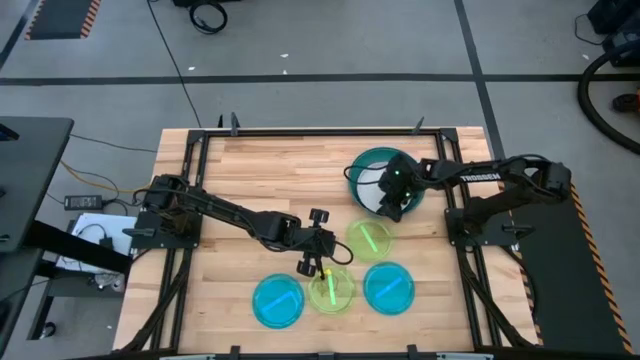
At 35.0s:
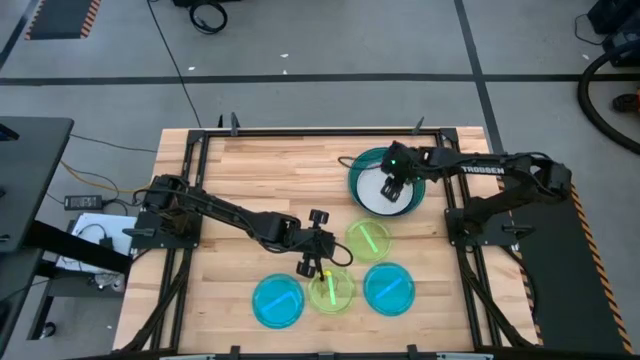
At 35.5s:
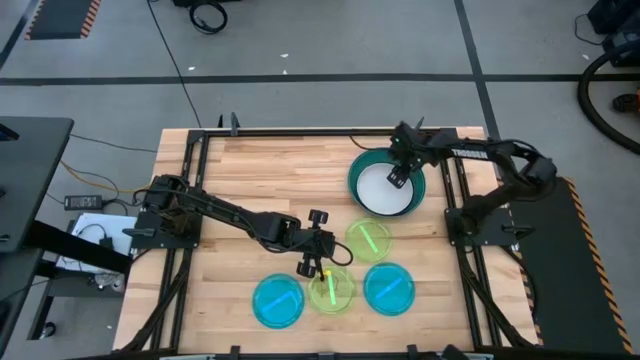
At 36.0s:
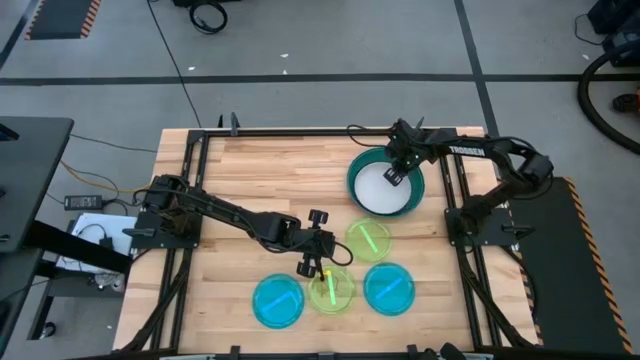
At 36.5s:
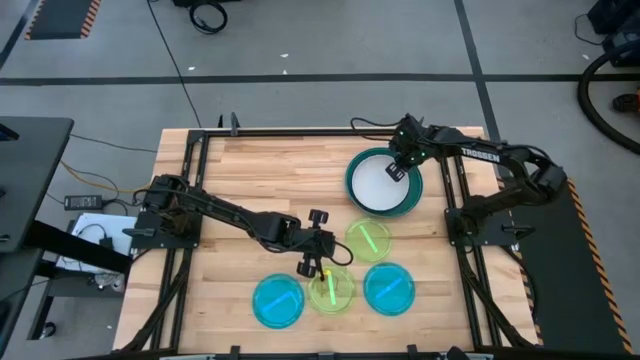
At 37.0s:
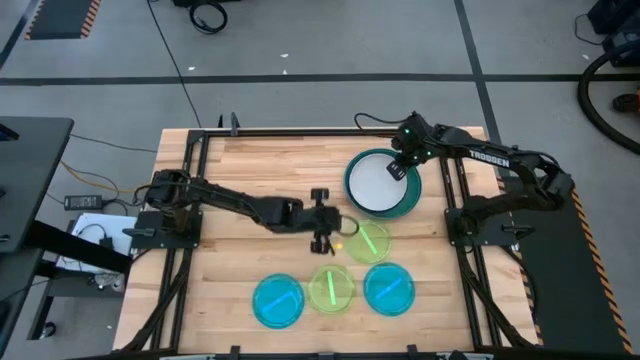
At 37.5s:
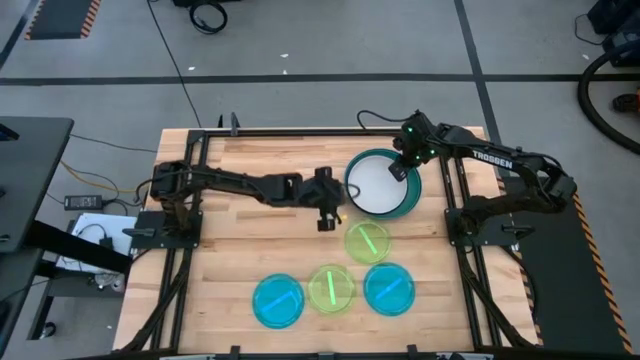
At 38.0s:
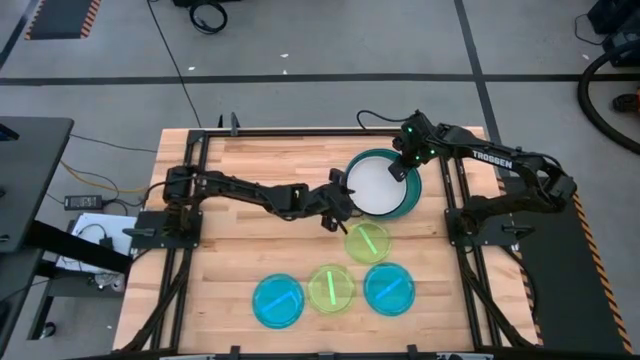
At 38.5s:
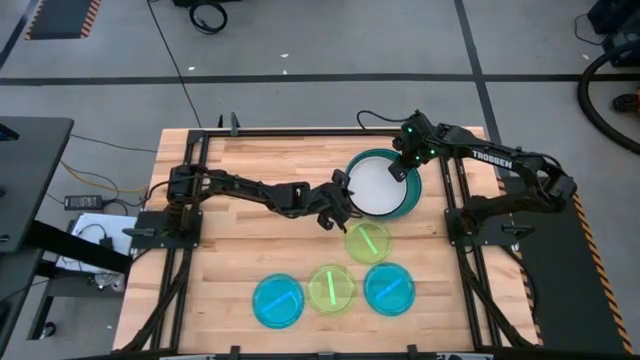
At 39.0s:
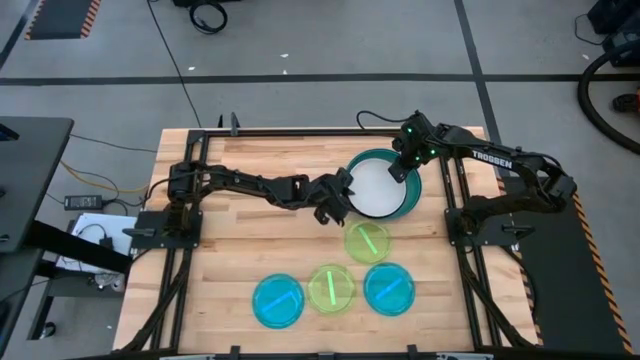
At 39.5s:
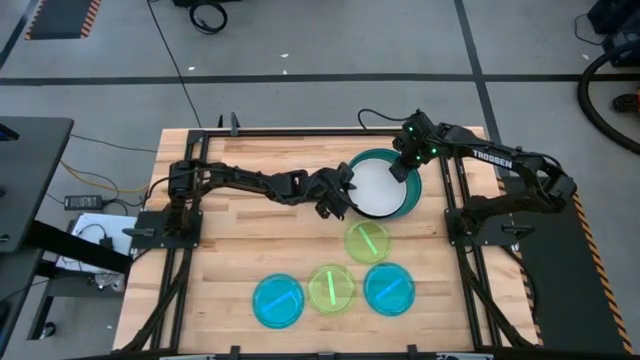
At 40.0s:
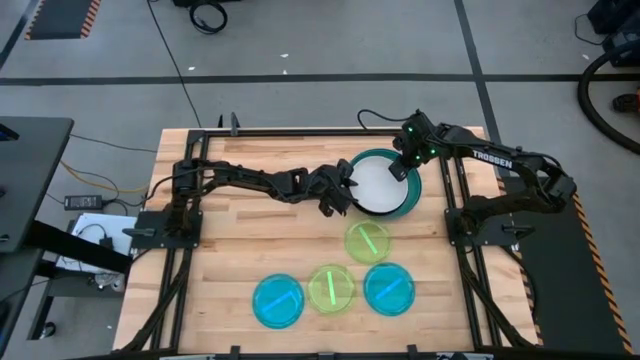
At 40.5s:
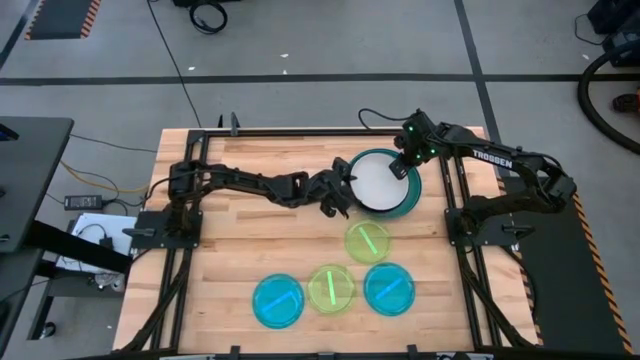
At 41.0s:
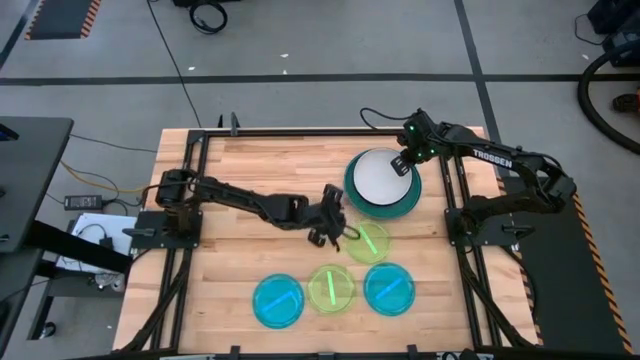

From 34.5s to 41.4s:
Task: Stack plastic plates
Adjust the stacked plates

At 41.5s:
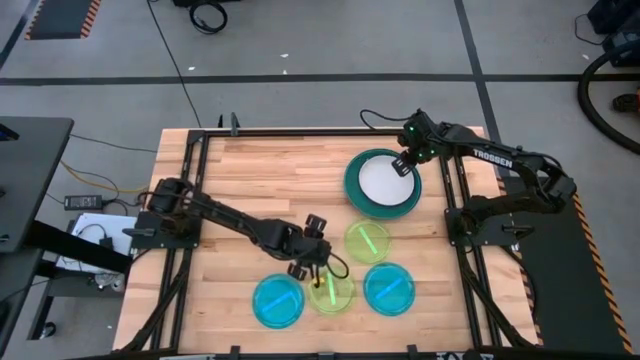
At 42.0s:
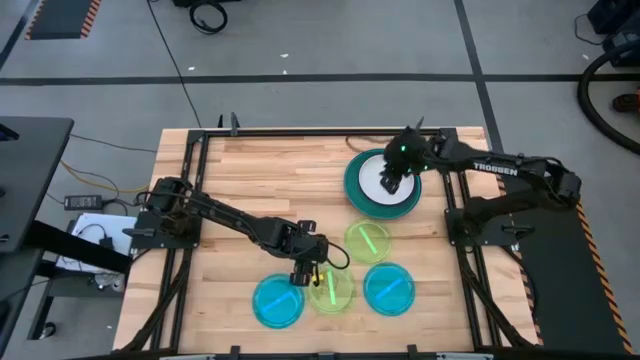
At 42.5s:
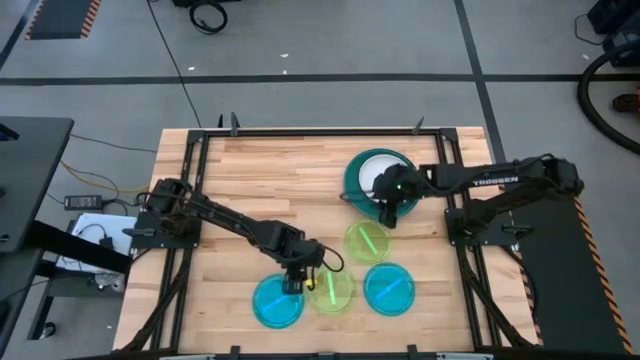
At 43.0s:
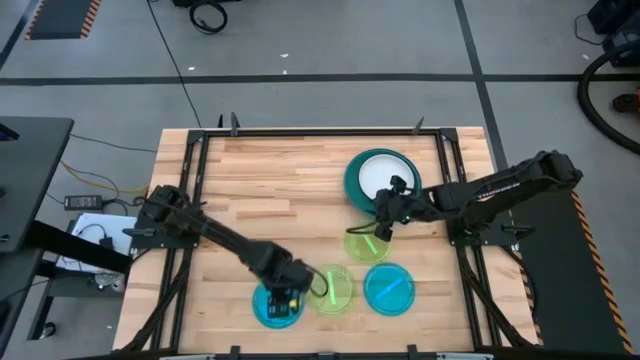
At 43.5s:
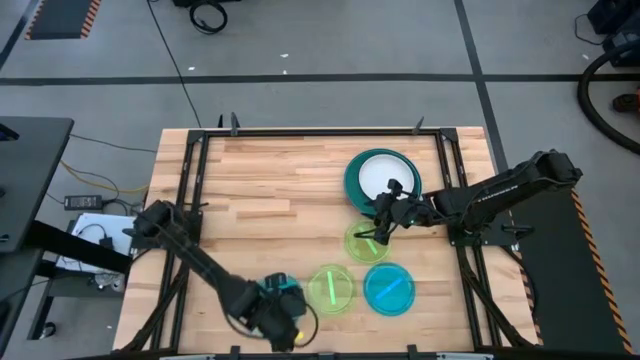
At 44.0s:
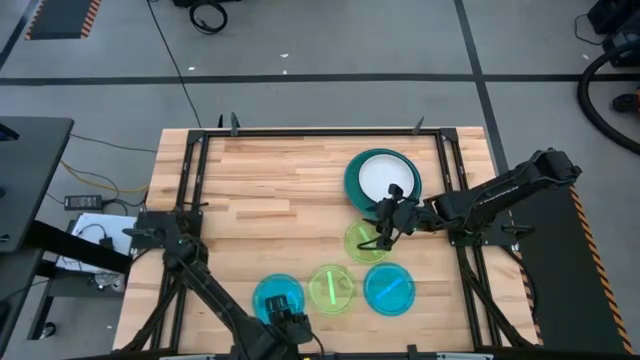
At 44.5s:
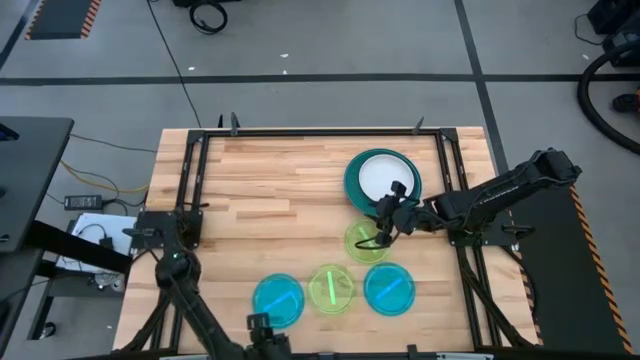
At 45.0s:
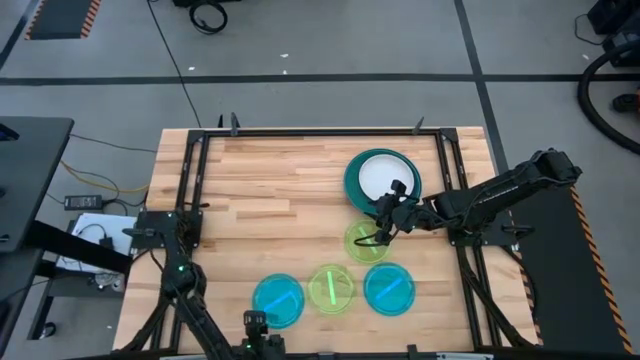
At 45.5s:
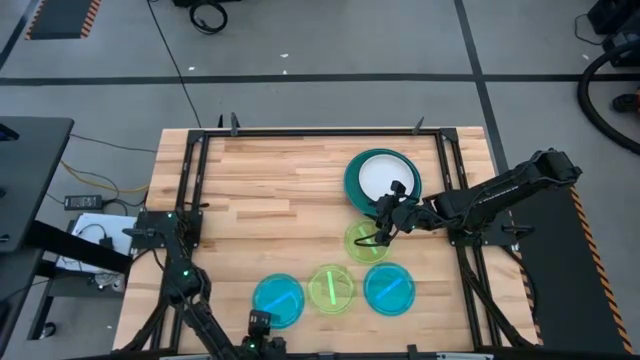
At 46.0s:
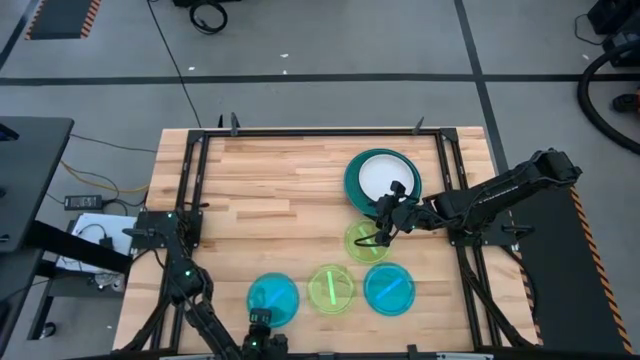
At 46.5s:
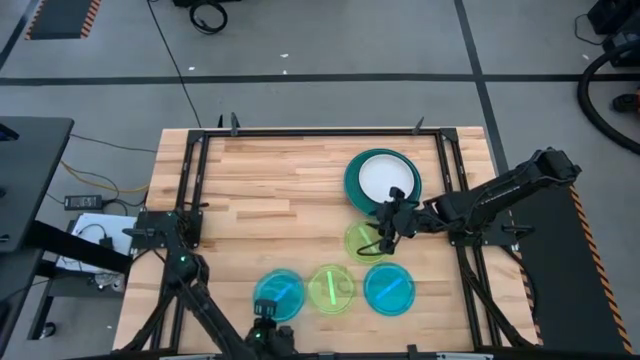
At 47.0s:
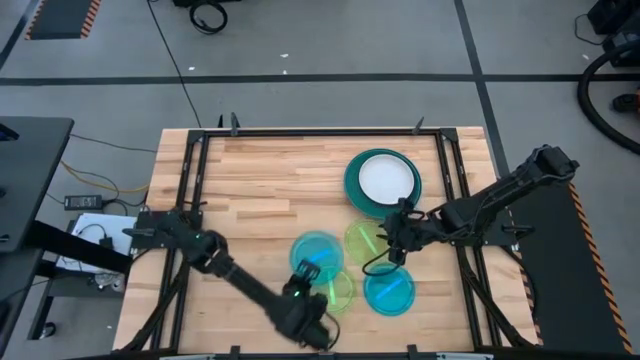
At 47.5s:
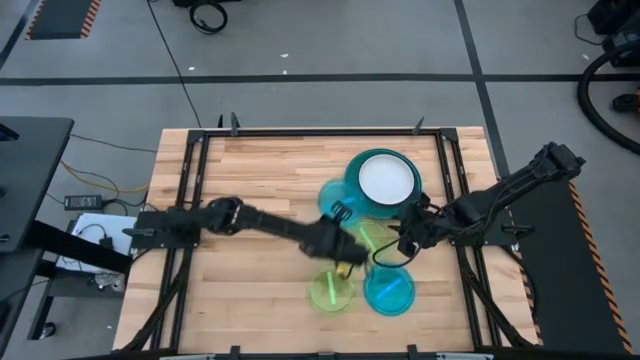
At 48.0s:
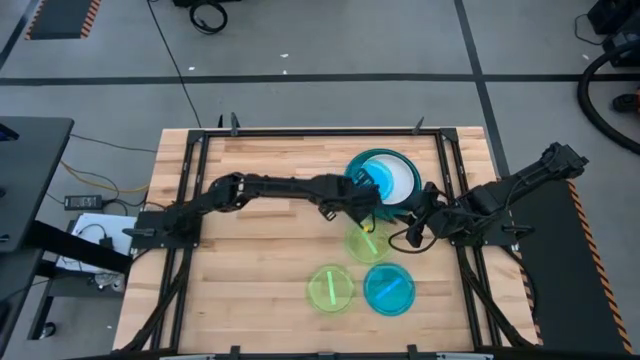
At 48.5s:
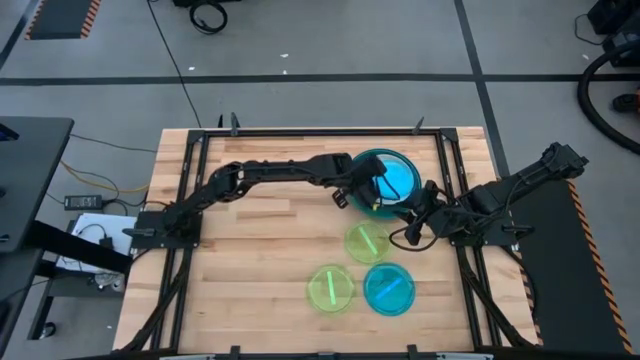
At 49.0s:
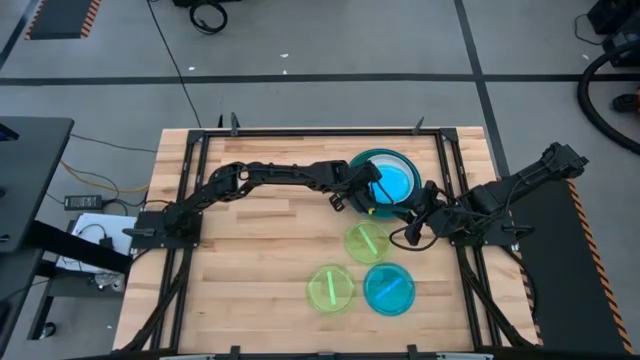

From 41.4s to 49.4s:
Stack the left blue transparent plate on the white plate

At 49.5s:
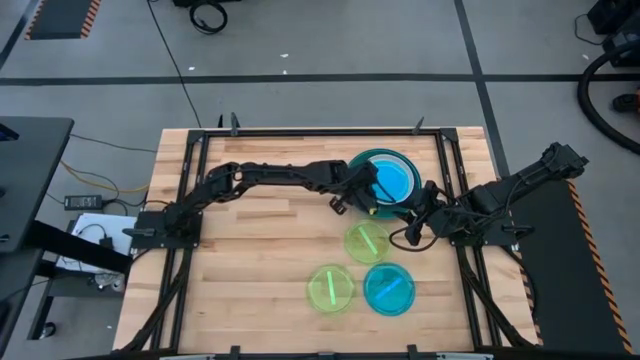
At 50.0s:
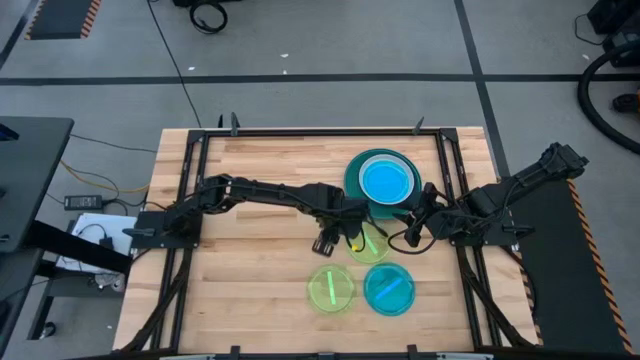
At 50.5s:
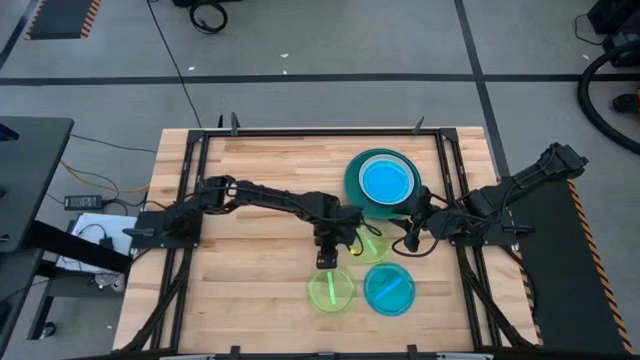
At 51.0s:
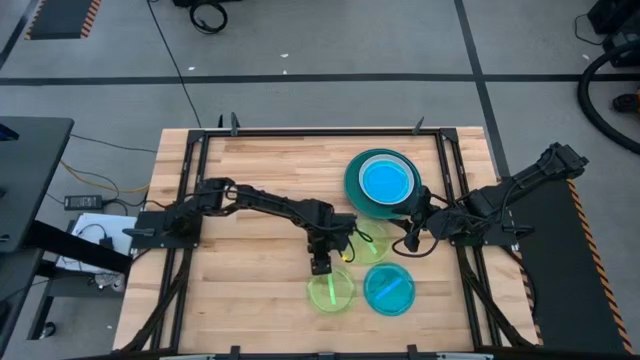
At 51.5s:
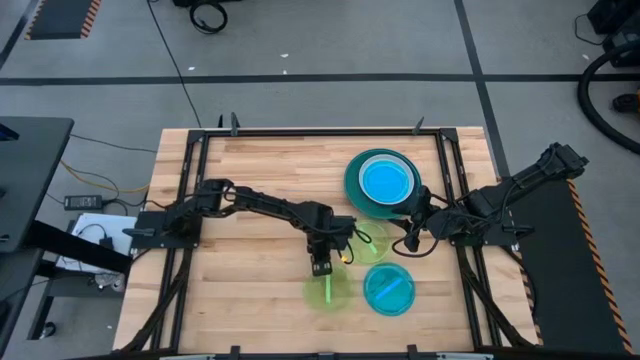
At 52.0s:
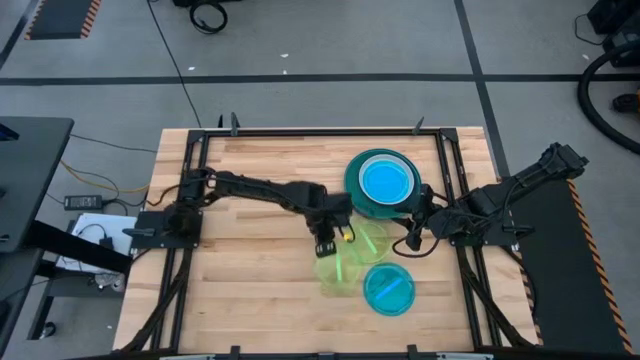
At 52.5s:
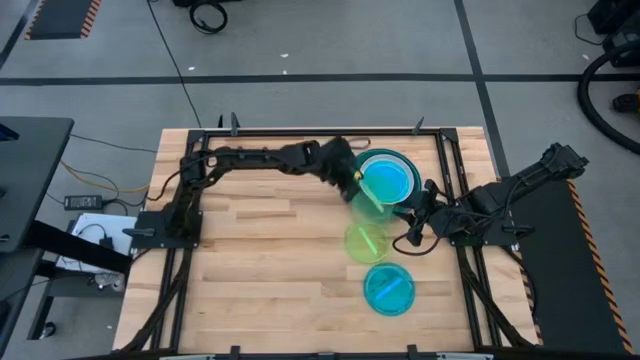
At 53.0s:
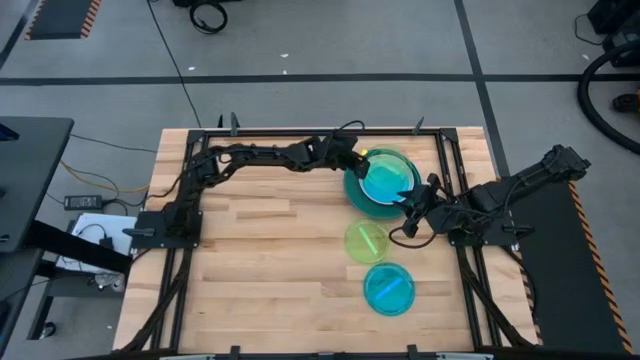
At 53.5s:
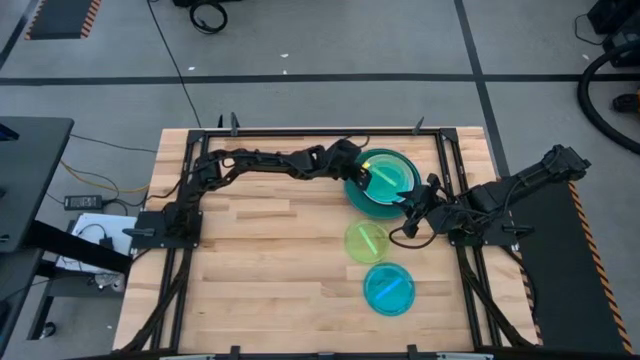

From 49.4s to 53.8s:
Stack the bottom green transparent plate on the blue transparent plate

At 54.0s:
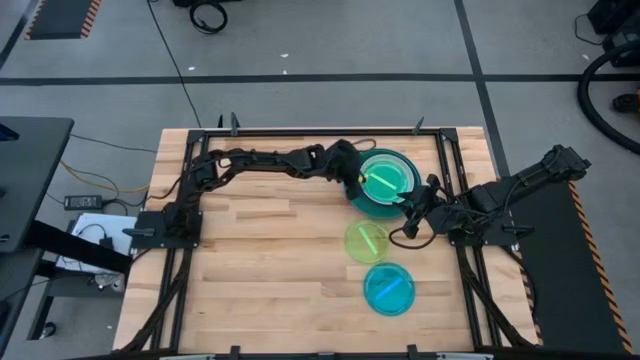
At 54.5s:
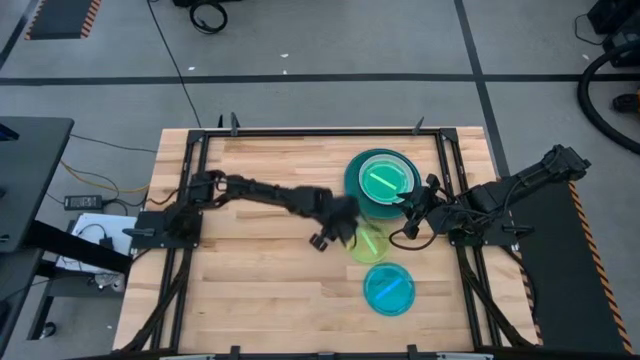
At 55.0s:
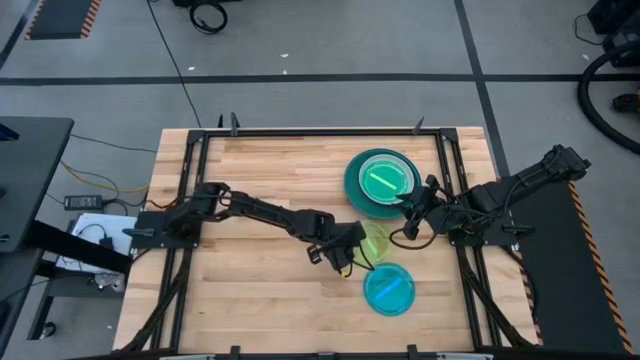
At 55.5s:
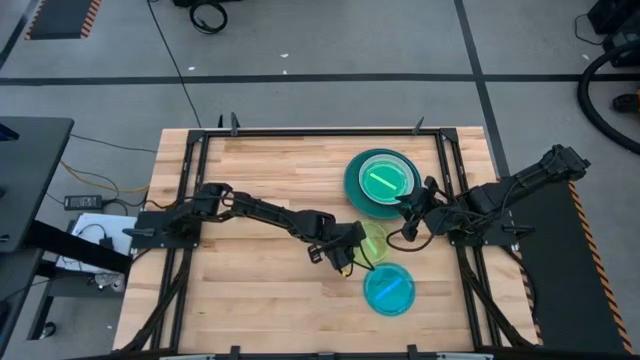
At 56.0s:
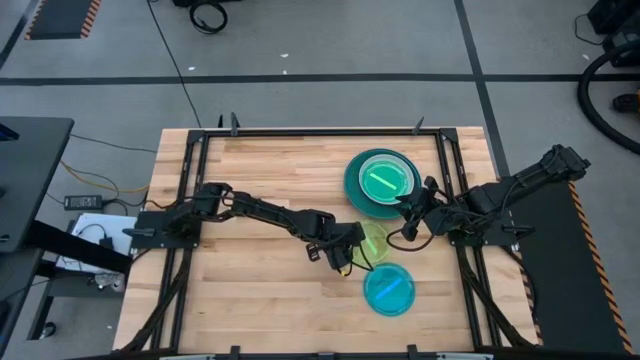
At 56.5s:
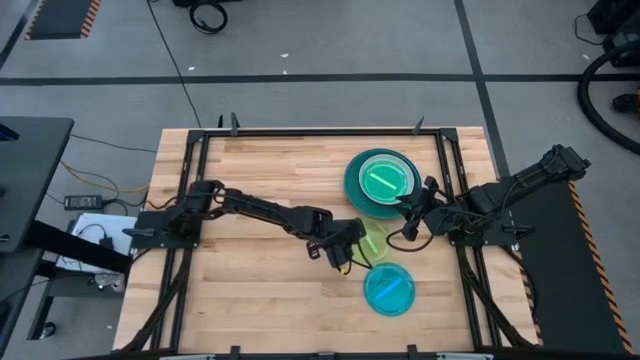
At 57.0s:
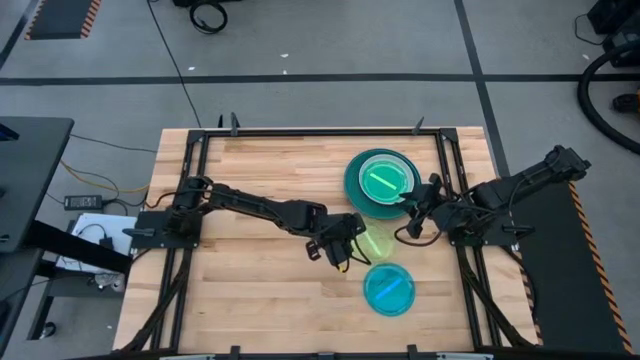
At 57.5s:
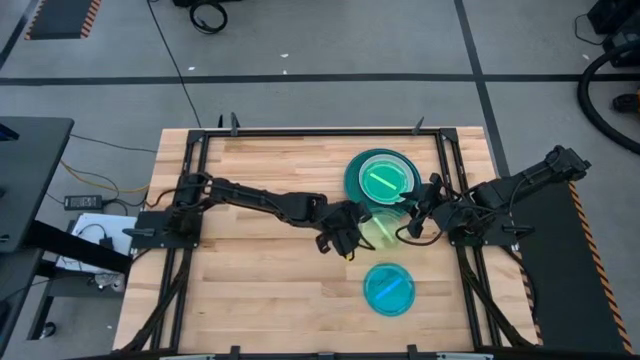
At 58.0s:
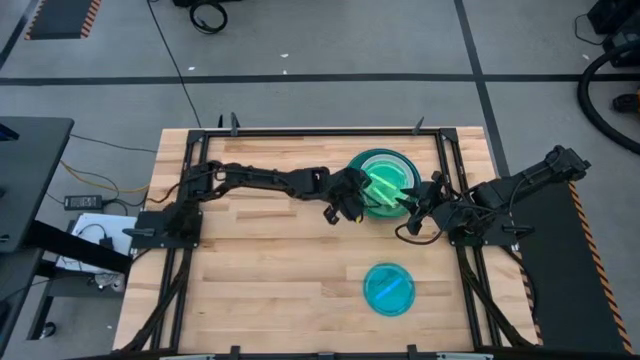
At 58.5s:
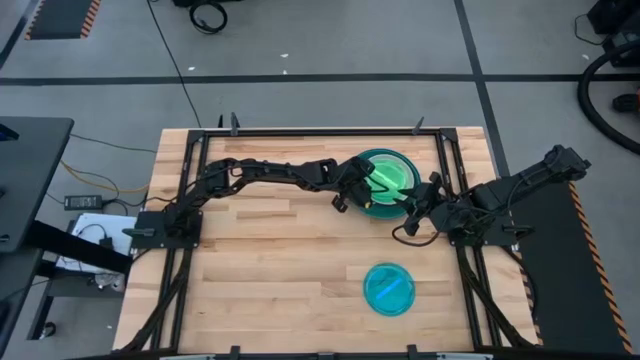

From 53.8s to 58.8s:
Stack the green transparent plate on the green transparent plate
